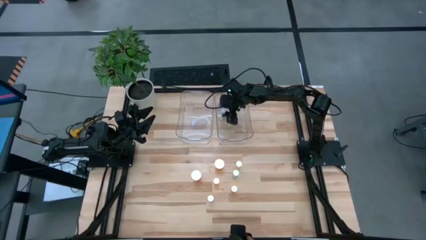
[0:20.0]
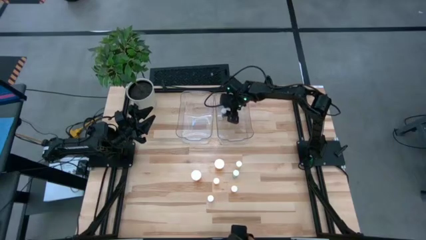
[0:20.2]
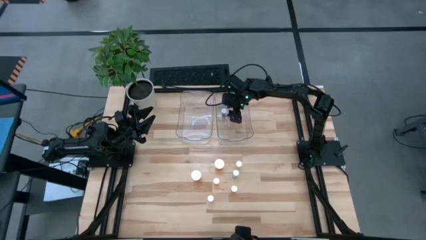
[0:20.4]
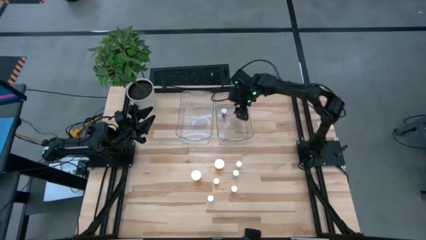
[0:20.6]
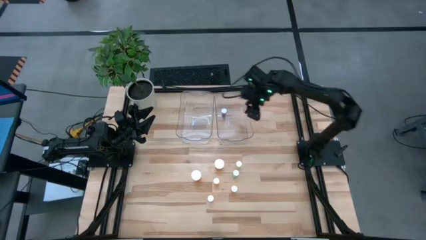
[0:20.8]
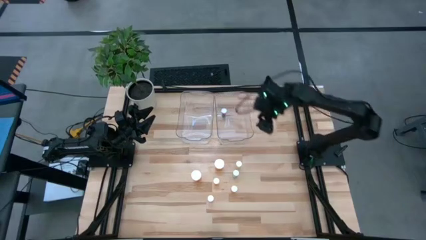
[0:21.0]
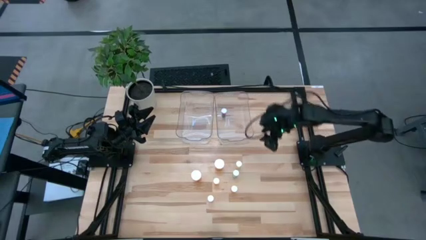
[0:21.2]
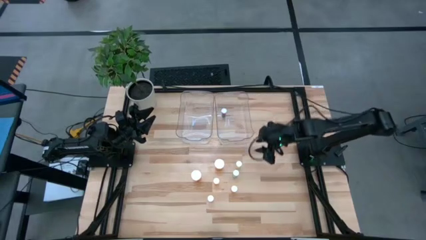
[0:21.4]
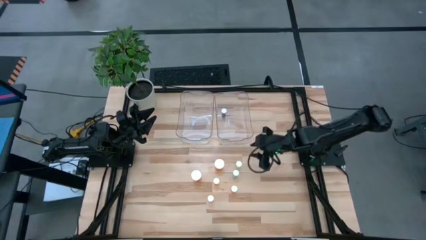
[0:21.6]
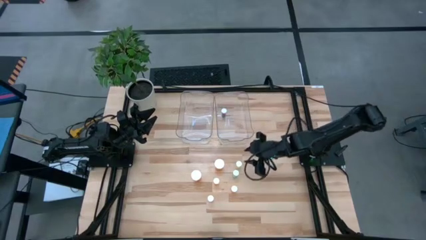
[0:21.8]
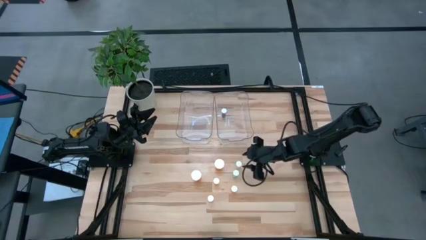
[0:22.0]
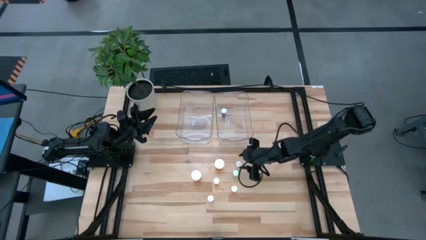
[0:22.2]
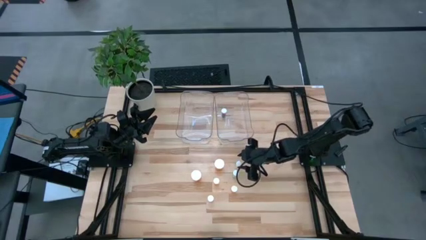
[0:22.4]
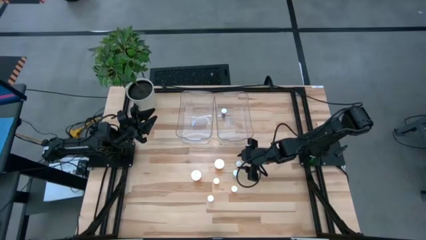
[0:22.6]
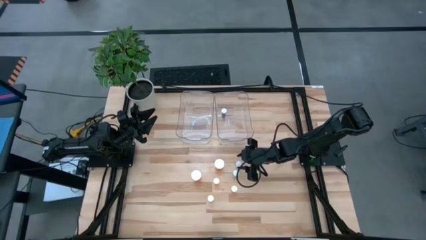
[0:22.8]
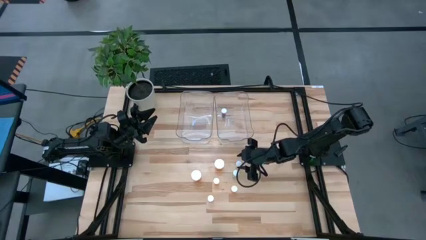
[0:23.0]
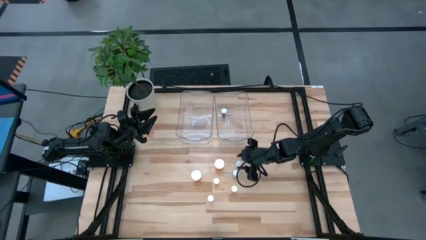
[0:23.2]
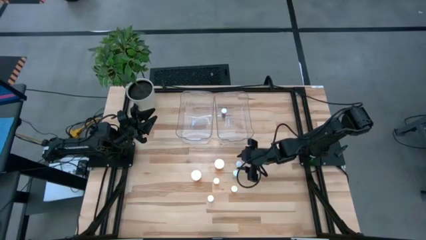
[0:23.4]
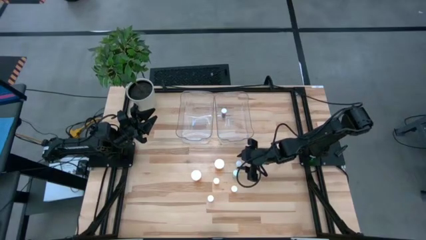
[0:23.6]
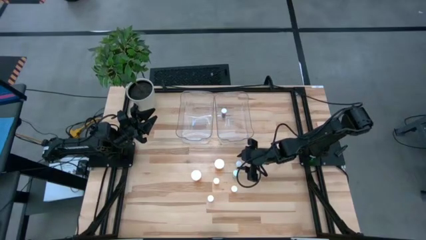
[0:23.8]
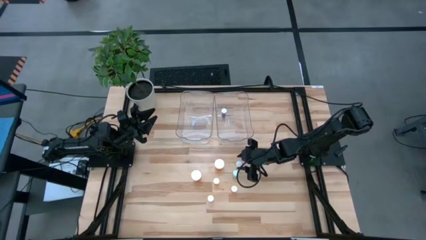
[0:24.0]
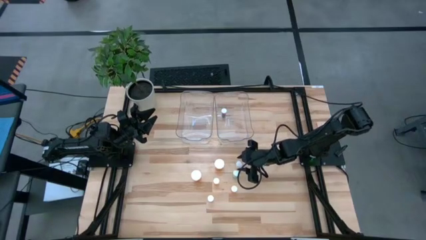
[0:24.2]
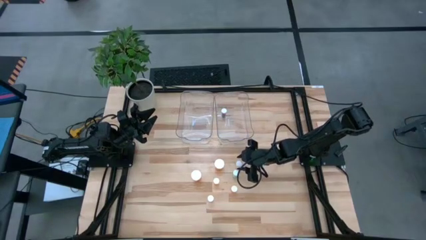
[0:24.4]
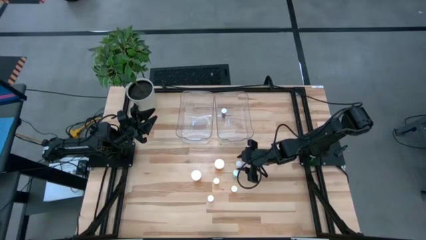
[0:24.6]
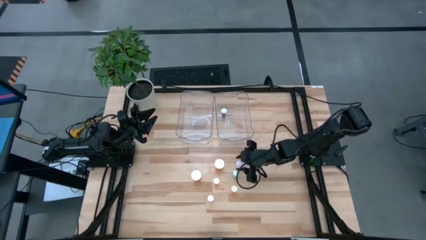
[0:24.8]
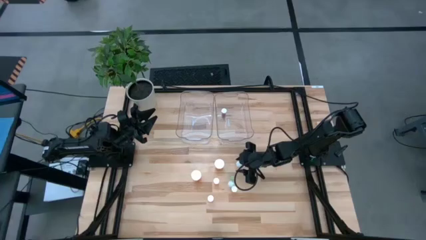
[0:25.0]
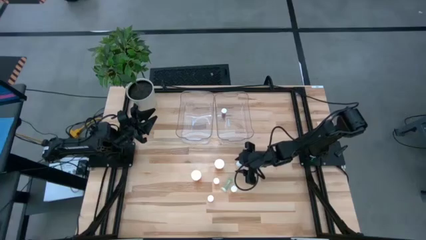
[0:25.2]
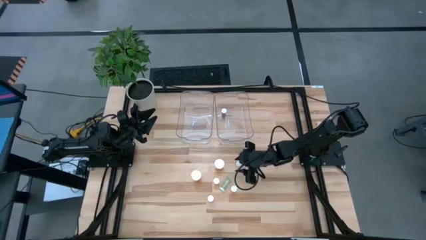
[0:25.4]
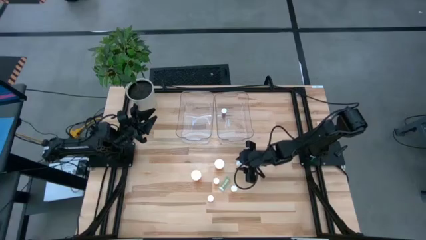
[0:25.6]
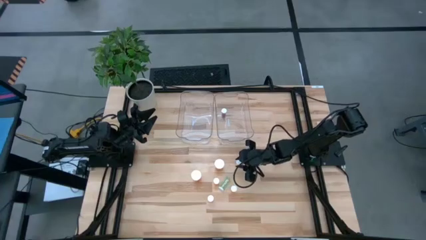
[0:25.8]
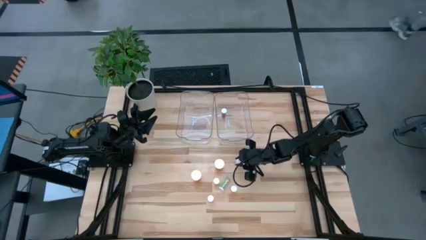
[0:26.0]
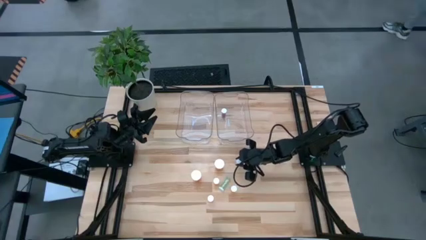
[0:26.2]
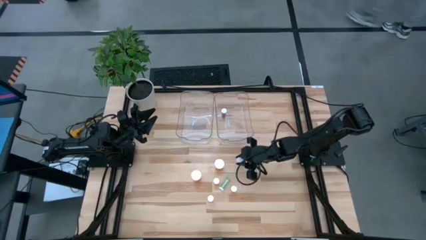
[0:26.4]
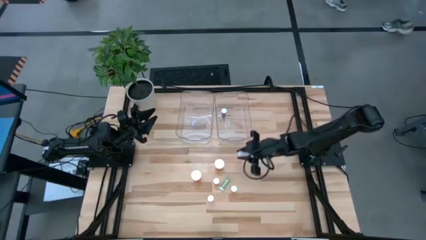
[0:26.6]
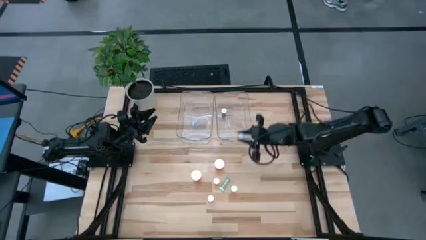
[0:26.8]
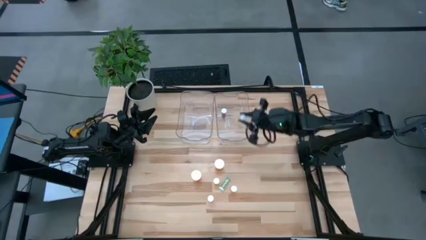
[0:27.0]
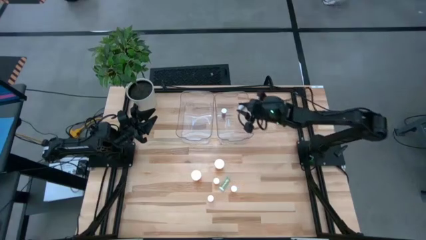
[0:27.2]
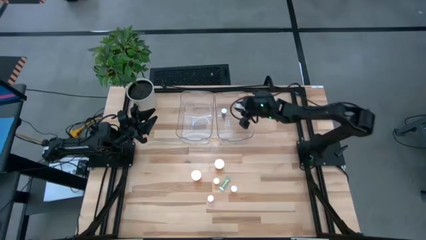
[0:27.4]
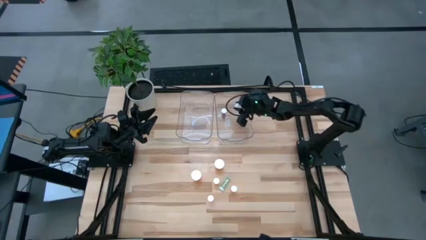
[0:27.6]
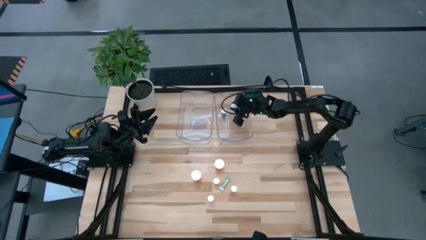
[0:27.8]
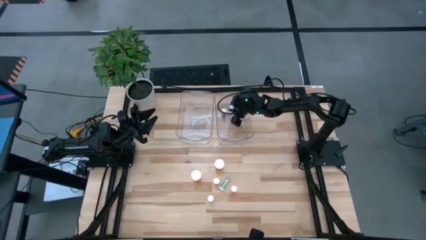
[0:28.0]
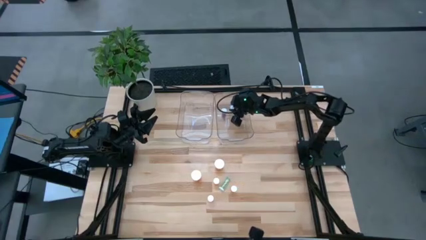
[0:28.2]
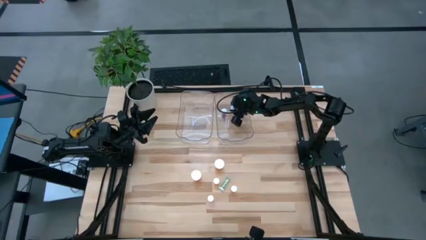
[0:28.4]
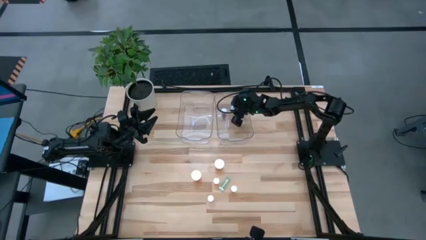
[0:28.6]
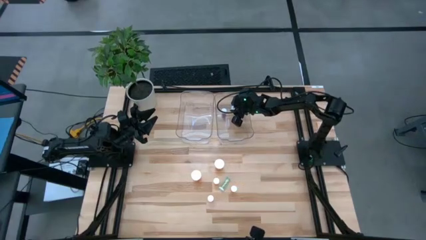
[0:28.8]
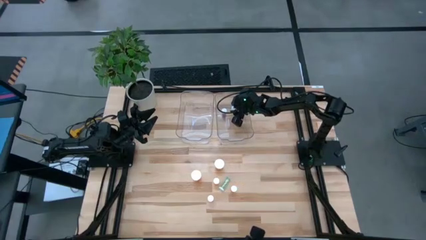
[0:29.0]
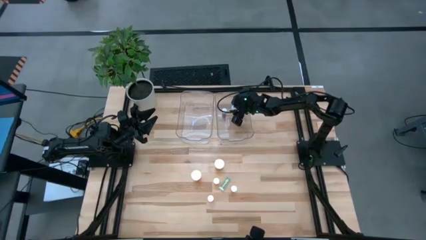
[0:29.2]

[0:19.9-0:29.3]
Task: Pick and place medicine bottles into bin by pill shape (circle, oval)
Put the yellow tablet bottle into the right transparent bin

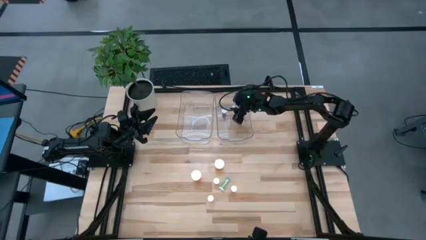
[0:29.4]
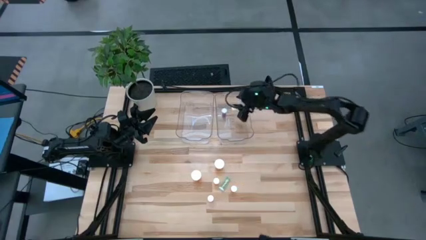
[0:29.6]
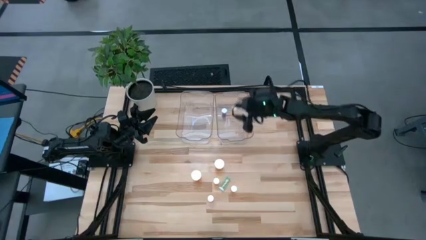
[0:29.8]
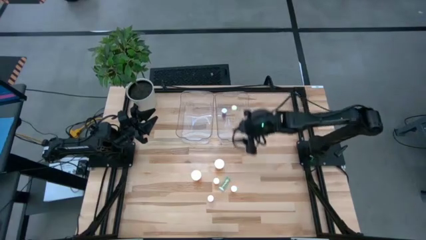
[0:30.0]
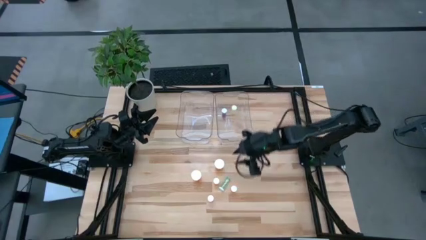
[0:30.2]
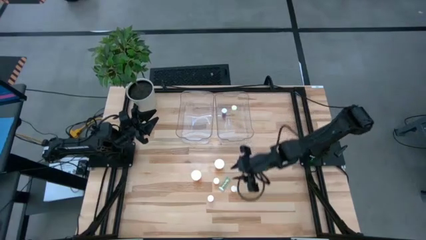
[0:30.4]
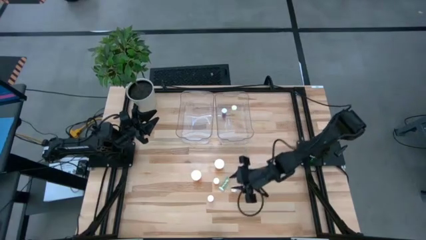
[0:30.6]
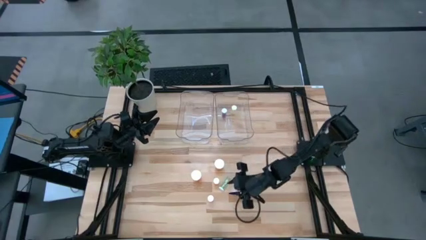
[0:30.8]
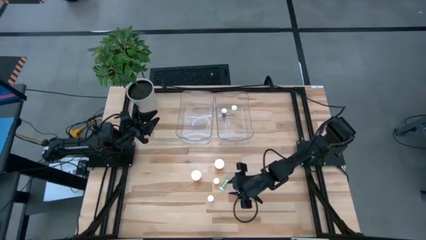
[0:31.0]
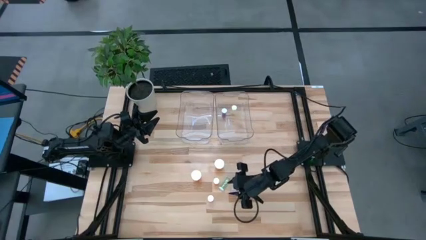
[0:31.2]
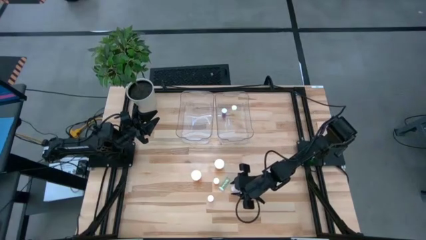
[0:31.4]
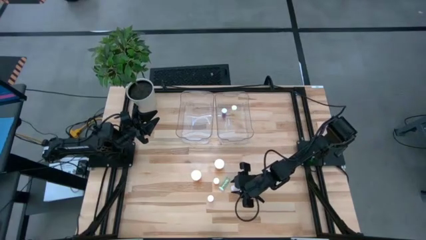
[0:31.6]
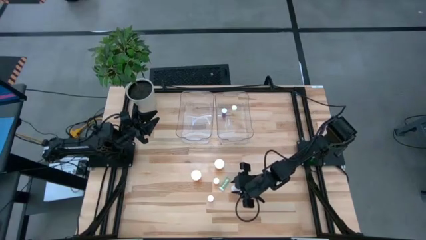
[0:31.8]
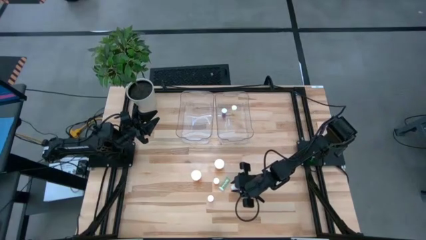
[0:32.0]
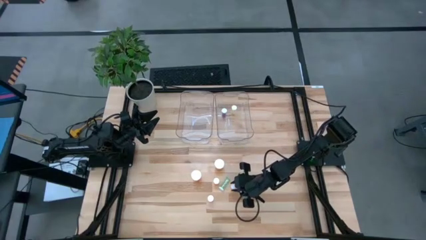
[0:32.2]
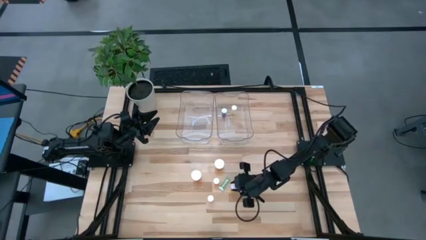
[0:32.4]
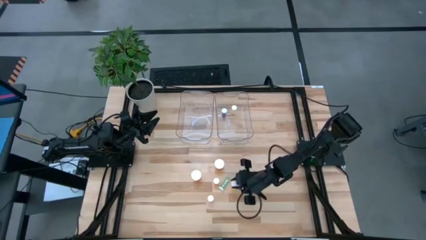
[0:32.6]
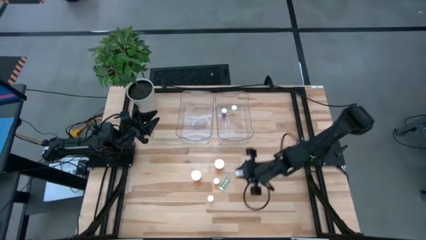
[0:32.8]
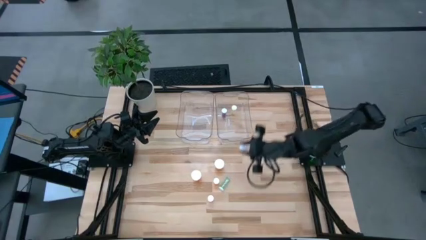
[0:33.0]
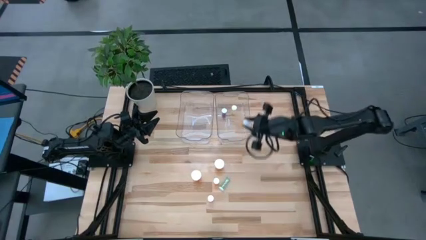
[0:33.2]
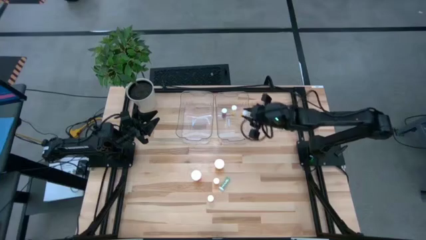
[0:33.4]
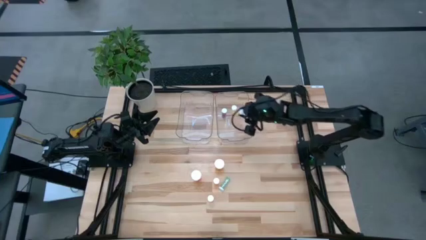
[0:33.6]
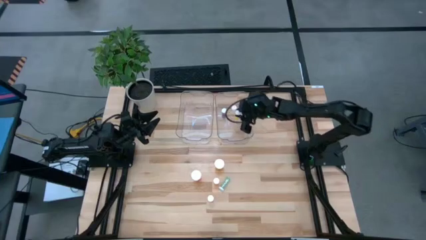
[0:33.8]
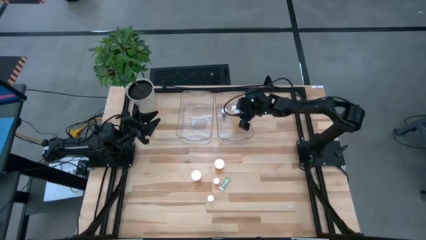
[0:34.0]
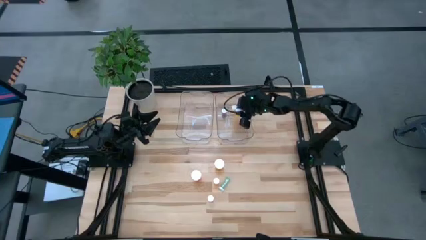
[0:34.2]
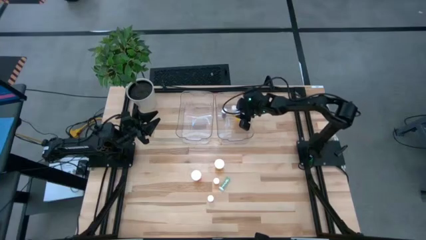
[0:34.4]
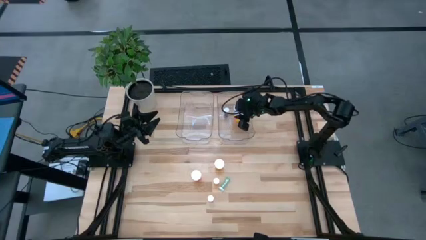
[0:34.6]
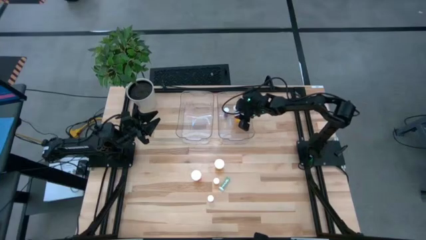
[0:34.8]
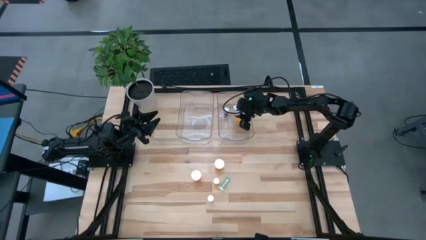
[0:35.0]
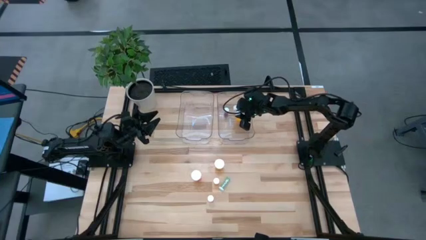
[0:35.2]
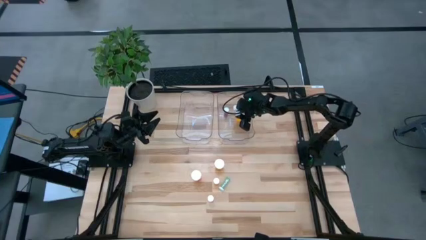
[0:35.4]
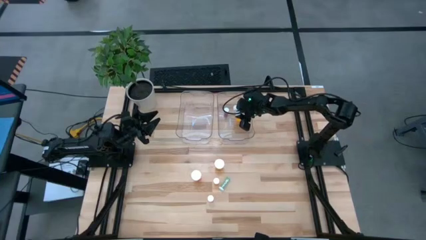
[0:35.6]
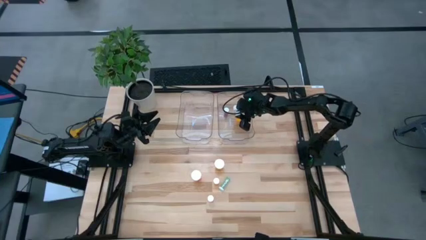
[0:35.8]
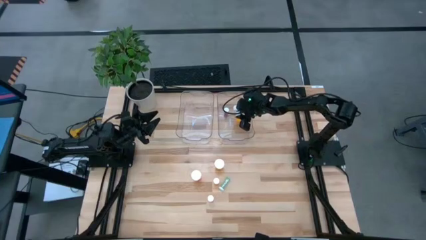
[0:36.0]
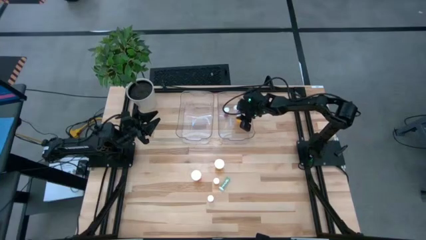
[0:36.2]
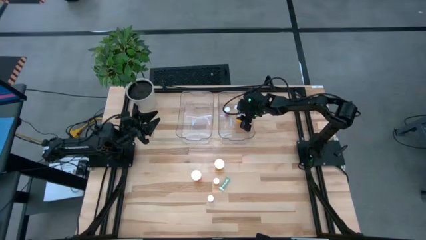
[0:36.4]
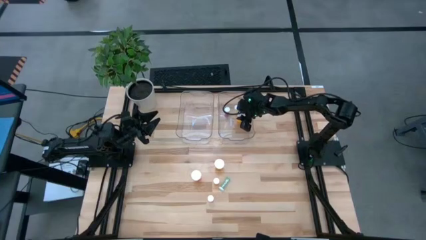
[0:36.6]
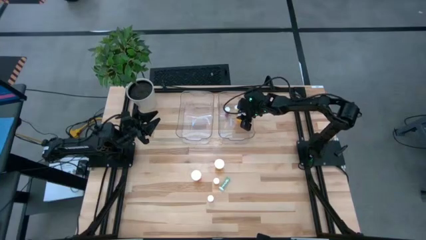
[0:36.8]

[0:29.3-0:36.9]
Put the right small orange tablet bottle into the right transparent bin
